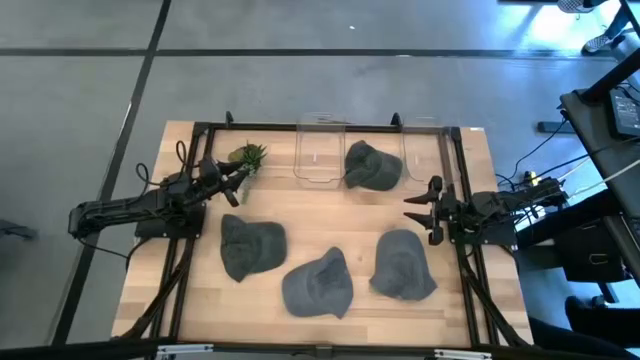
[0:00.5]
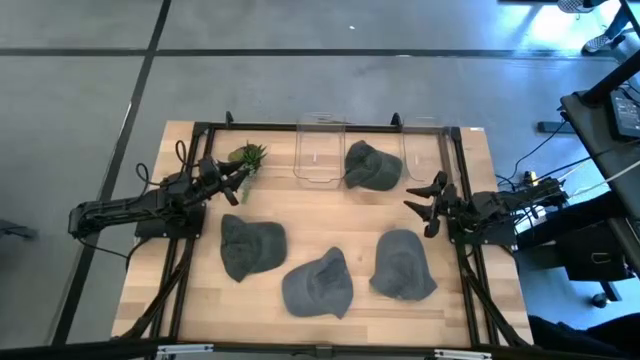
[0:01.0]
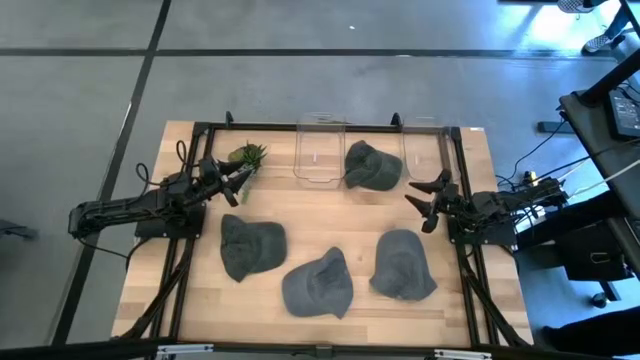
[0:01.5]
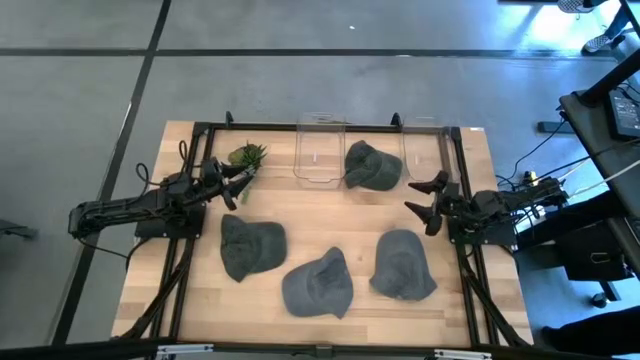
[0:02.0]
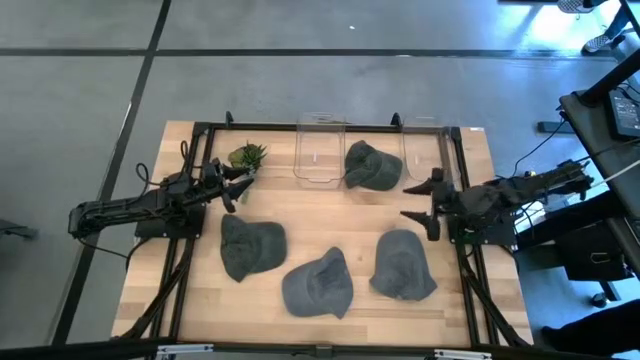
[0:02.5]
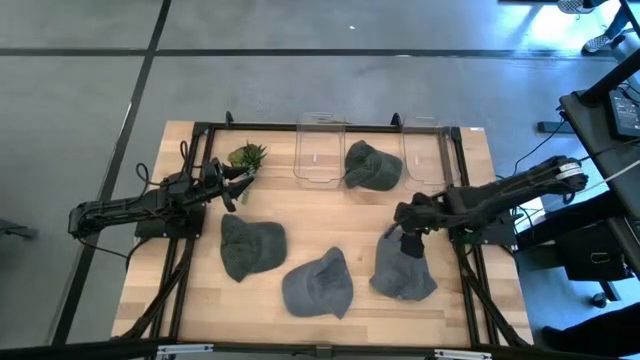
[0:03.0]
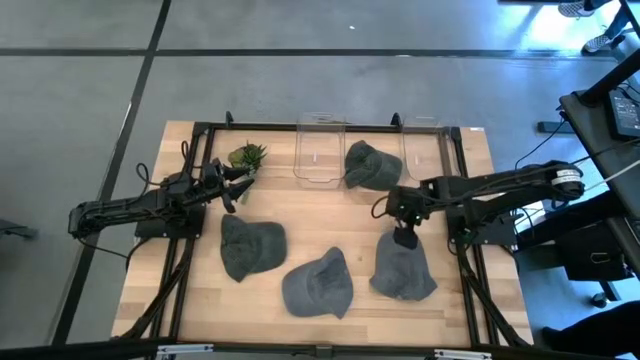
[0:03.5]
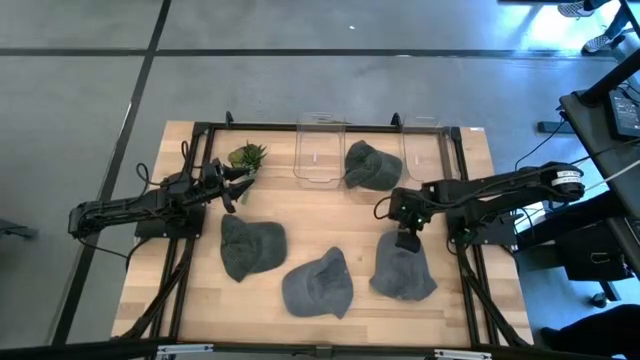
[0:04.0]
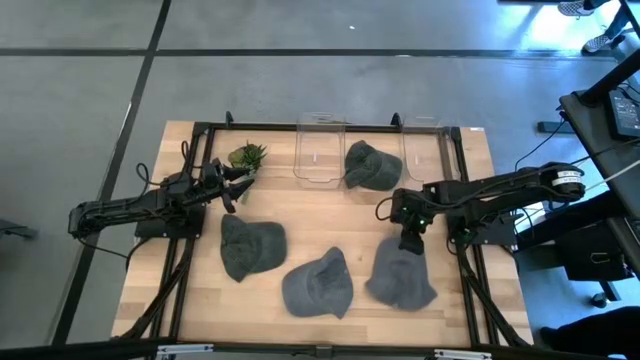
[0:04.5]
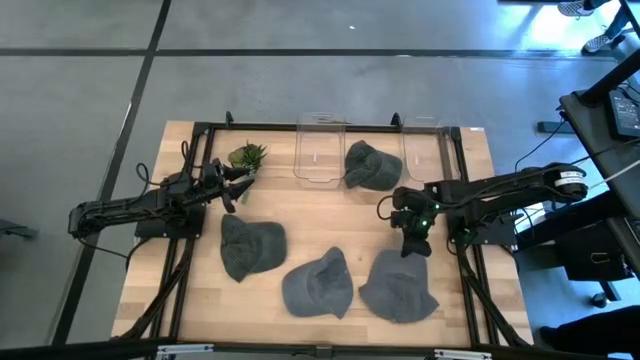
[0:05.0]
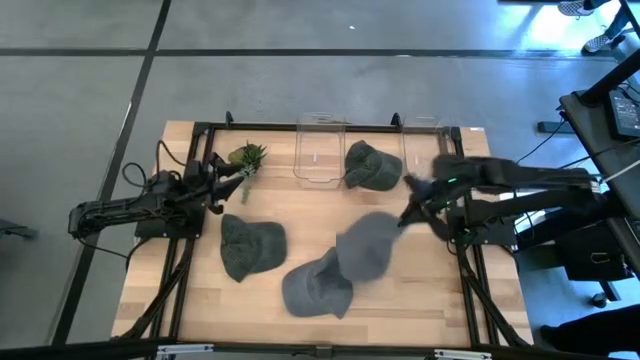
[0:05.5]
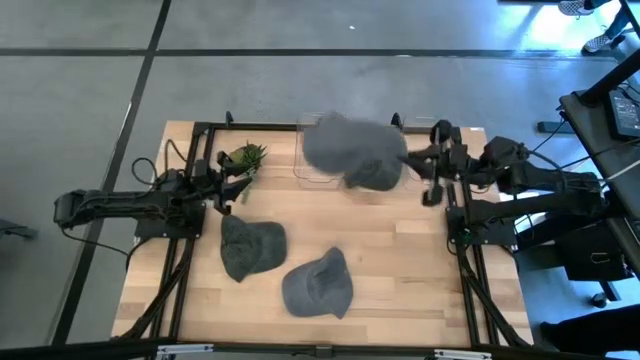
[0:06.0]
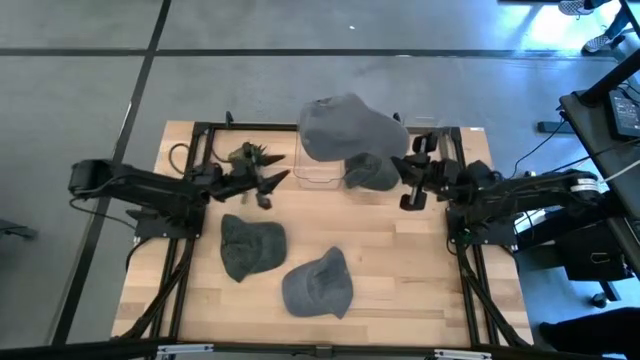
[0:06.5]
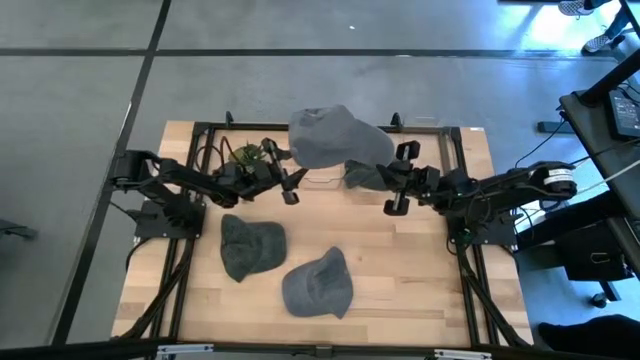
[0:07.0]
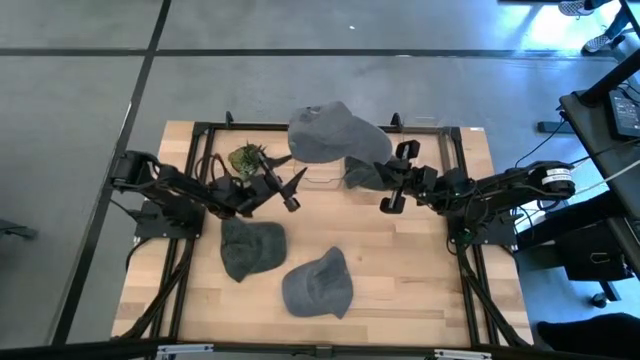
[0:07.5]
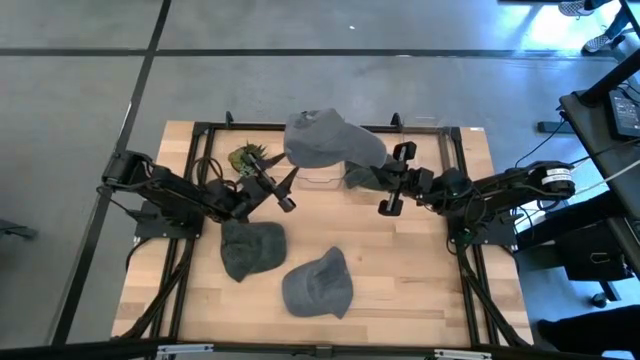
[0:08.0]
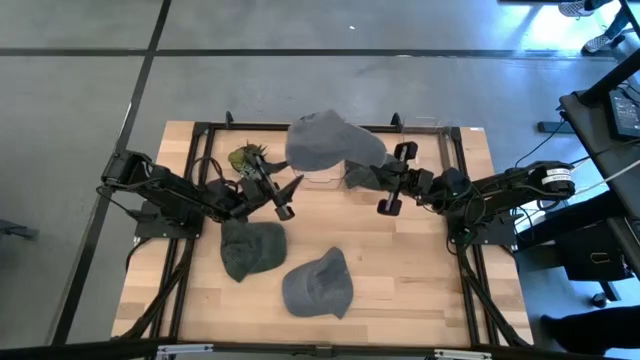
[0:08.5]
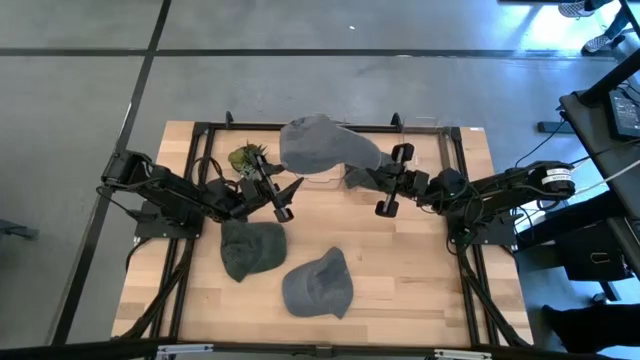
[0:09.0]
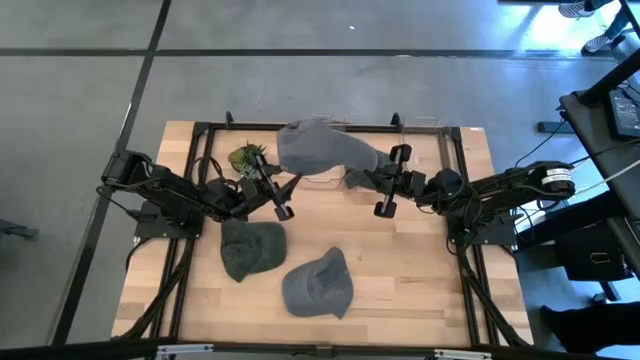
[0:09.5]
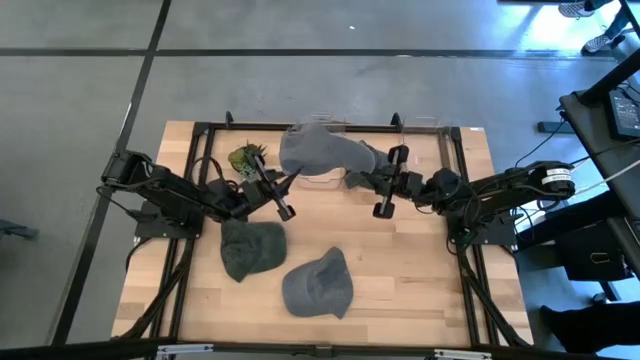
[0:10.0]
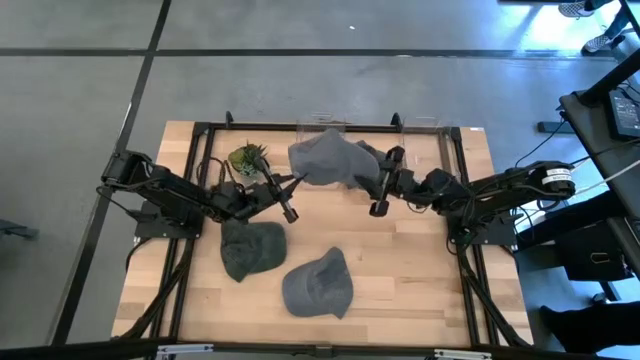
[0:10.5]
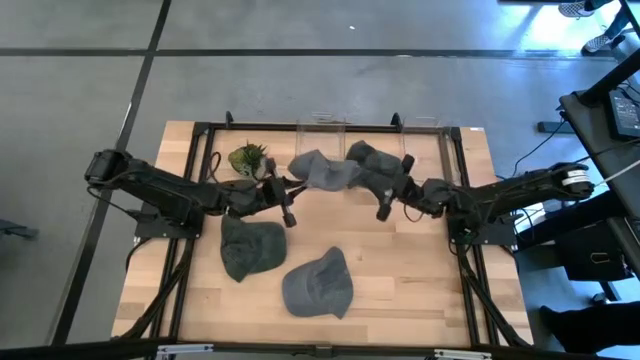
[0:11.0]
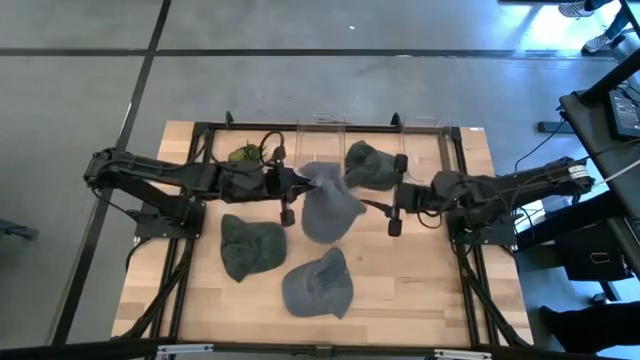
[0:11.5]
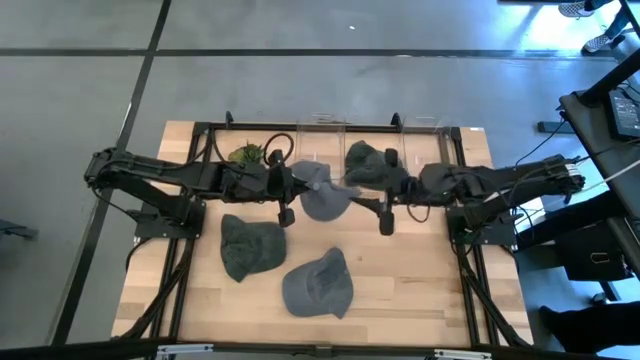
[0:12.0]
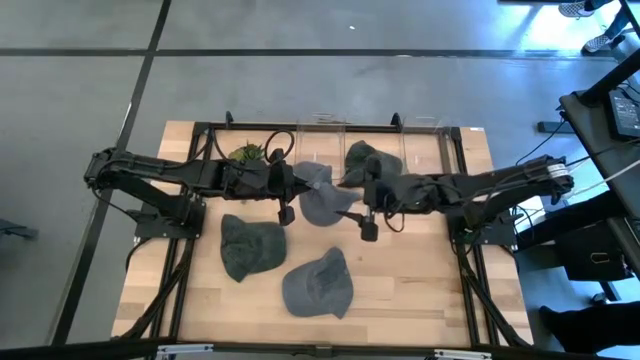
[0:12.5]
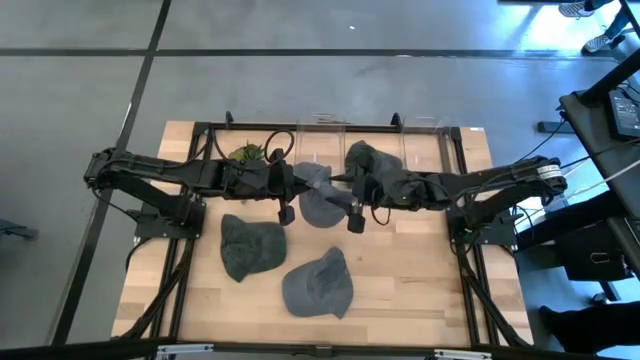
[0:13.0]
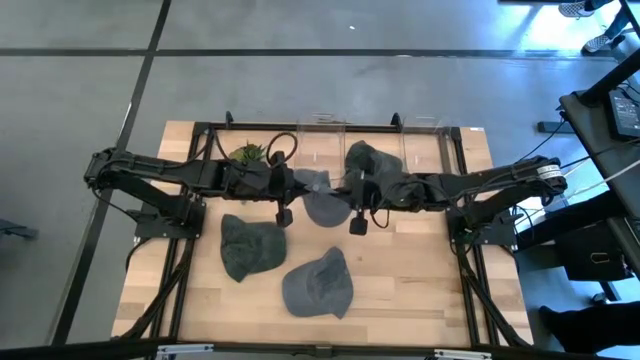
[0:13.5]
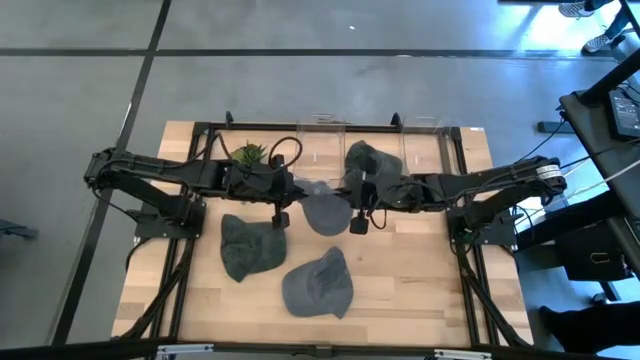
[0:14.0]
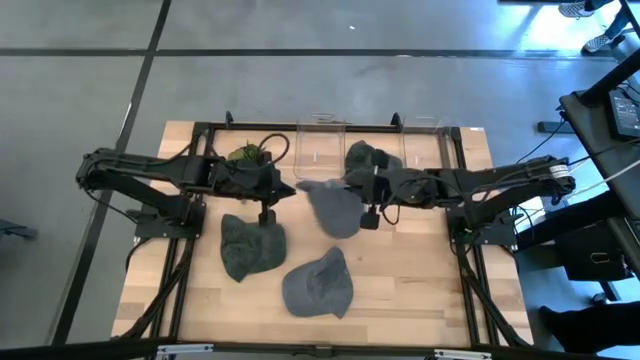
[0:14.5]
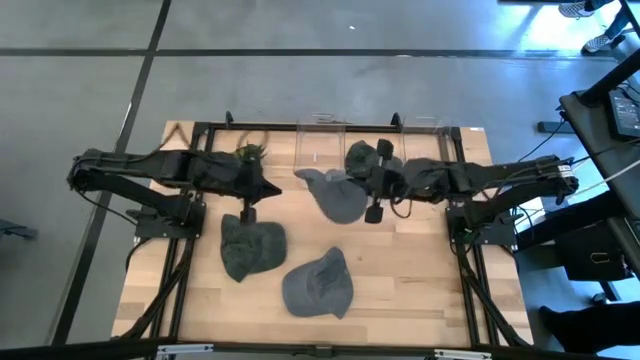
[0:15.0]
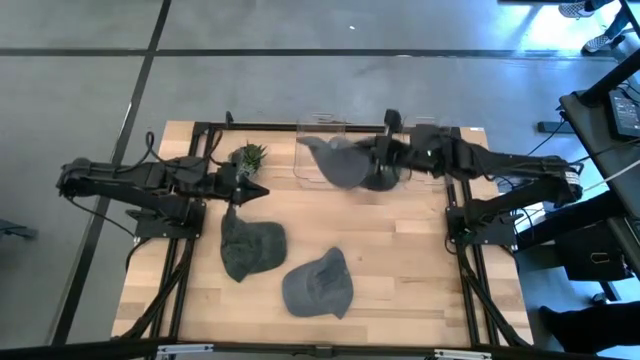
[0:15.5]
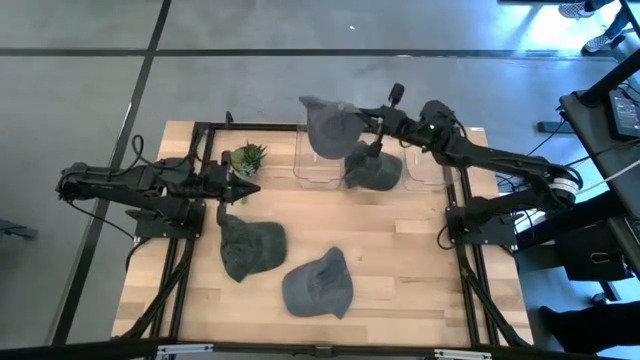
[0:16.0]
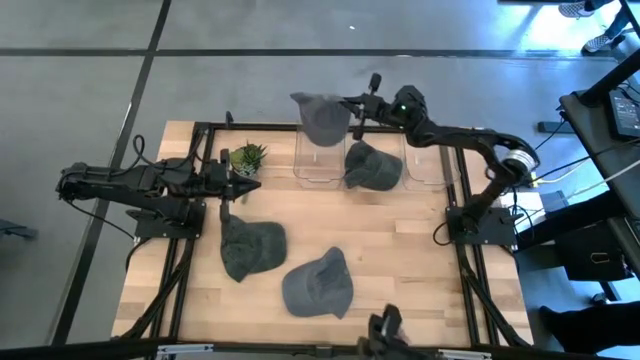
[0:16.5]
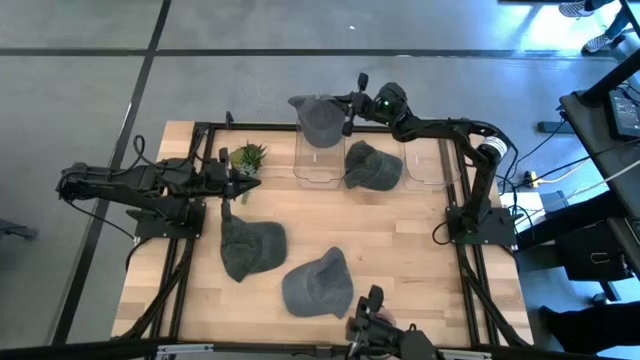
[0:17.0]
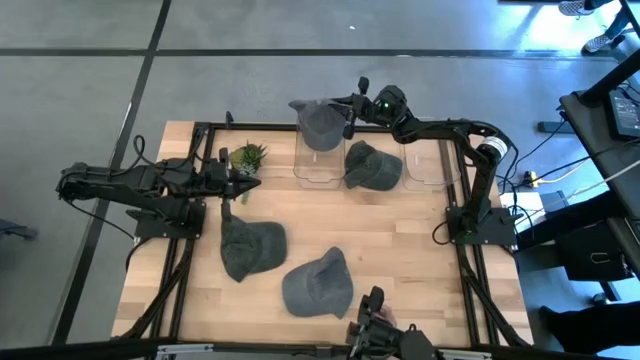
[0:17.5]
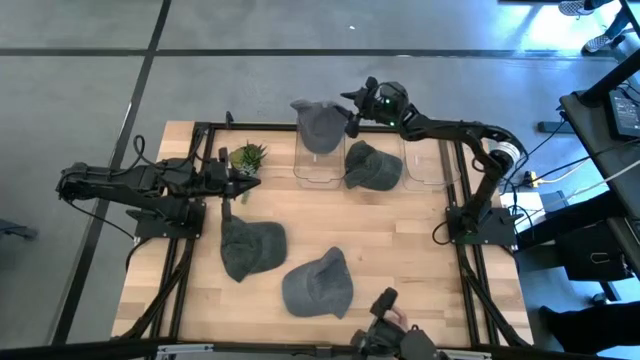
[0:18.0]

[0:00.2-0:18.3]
Task: Pick & Place hat
Put the right gray cap into the left transparent bin
